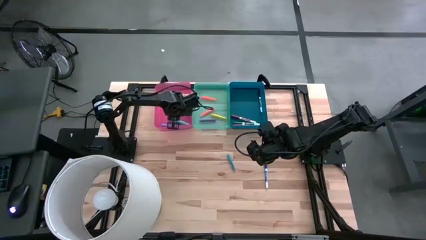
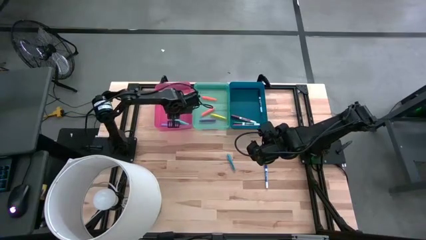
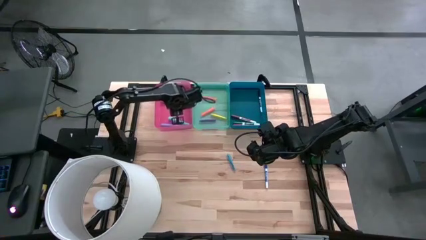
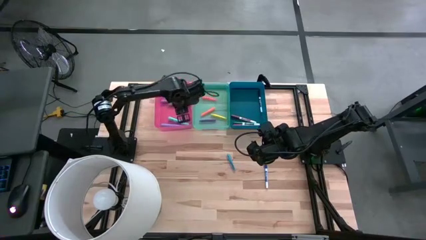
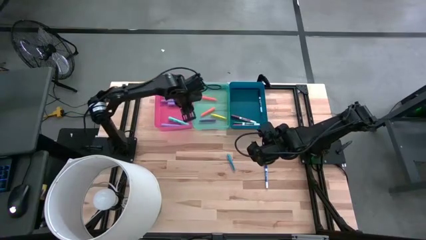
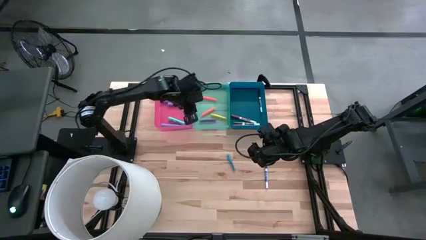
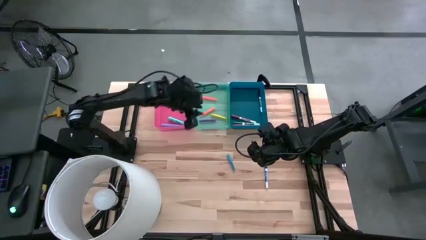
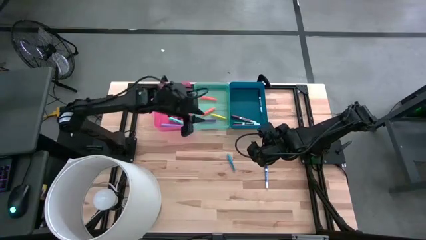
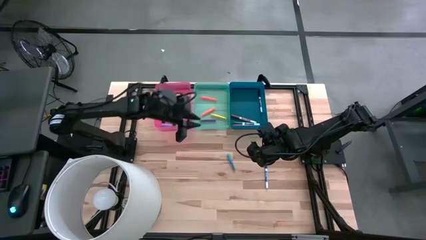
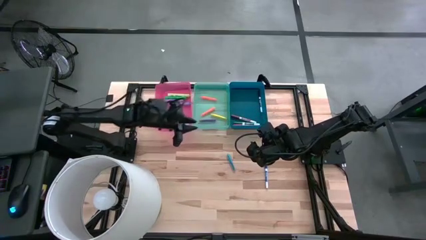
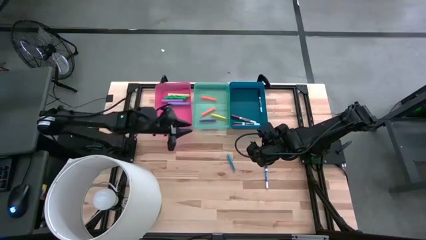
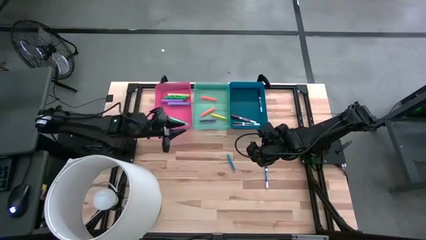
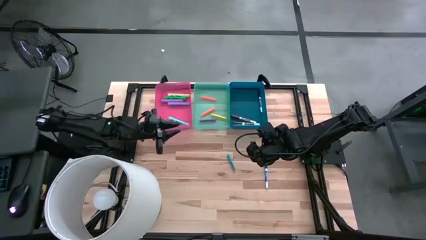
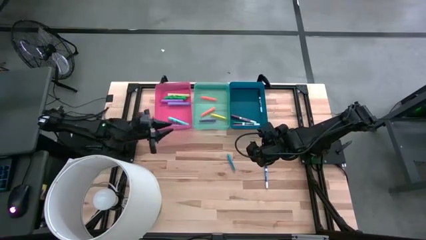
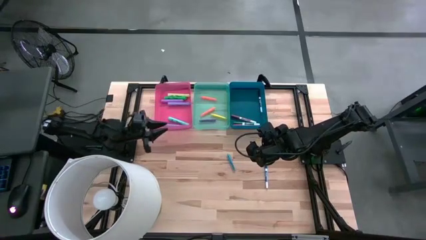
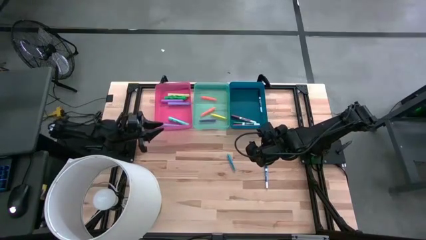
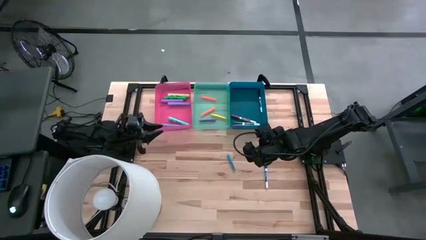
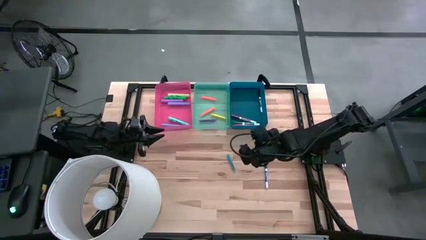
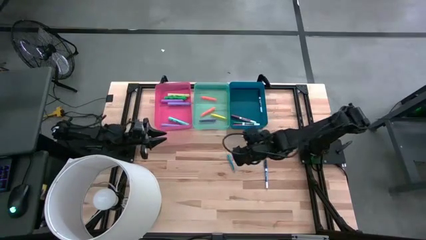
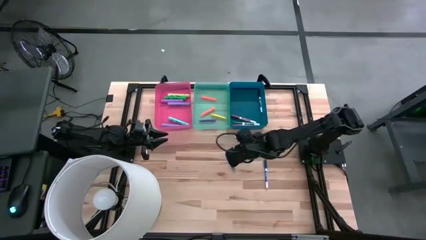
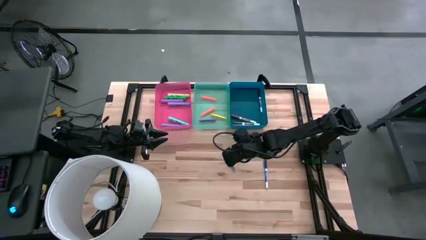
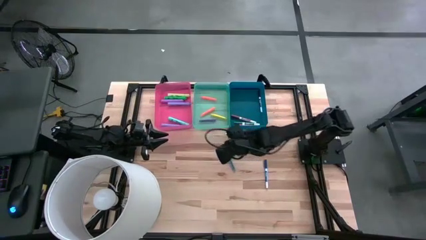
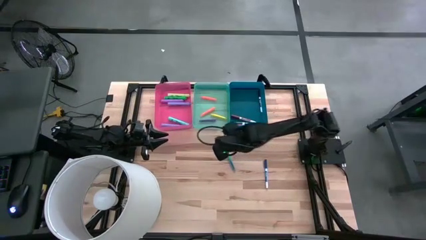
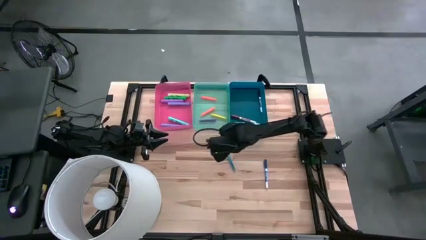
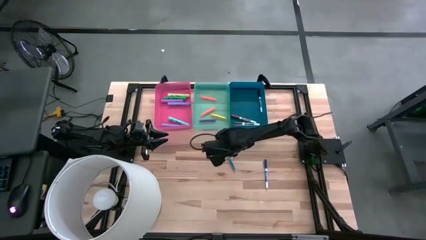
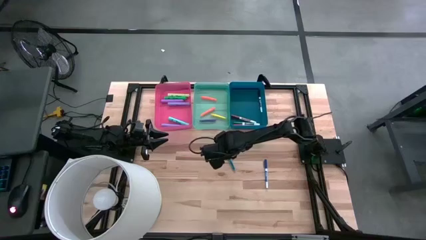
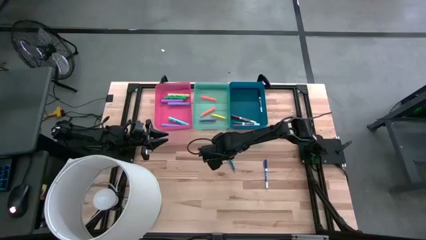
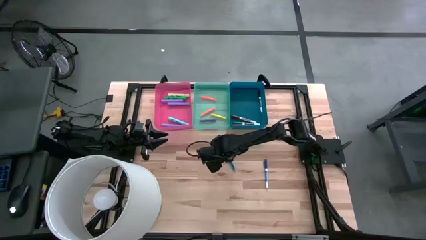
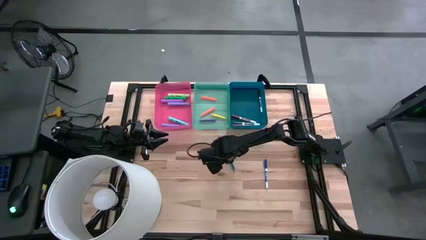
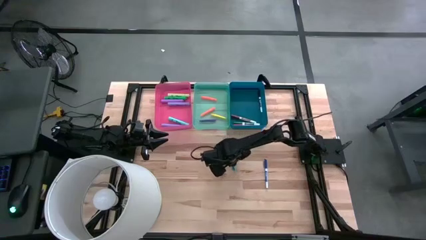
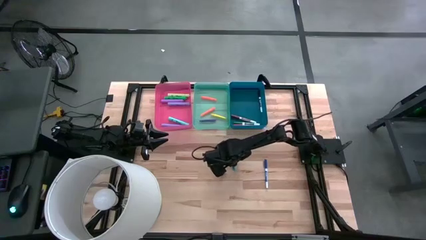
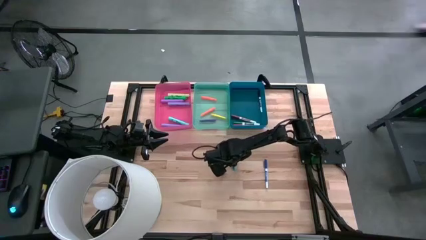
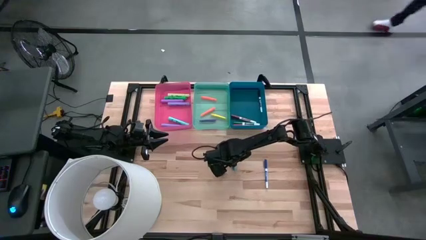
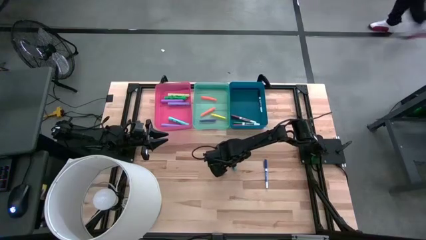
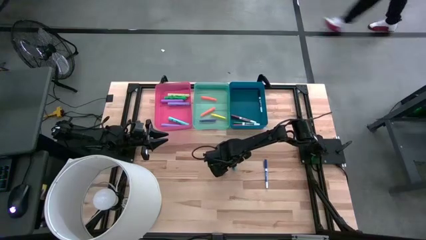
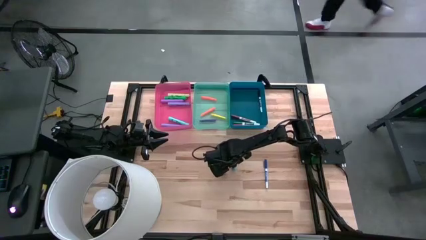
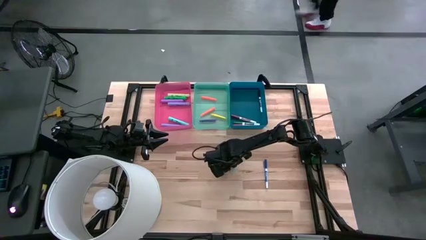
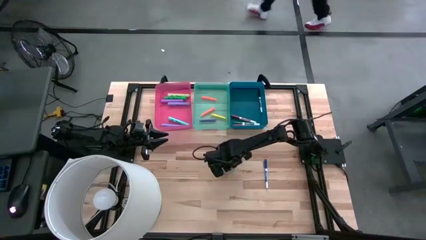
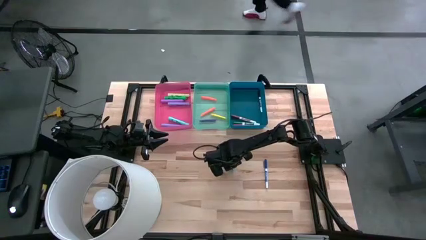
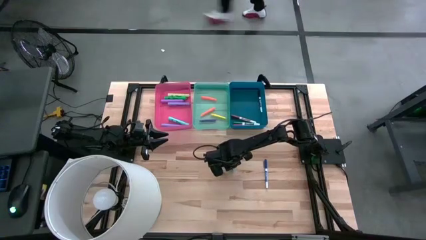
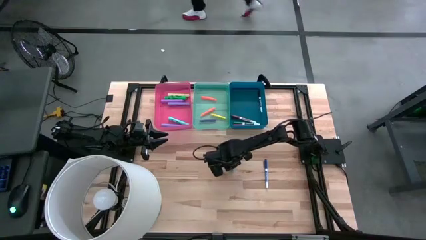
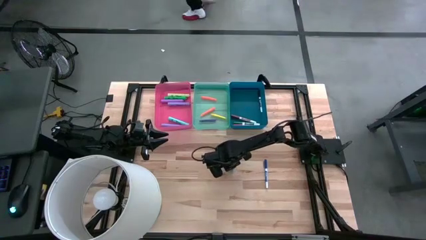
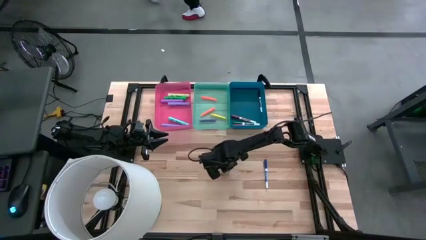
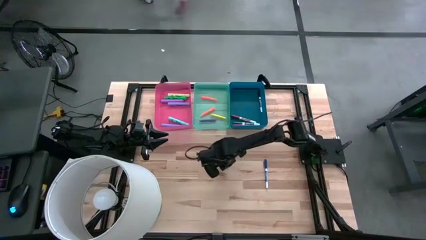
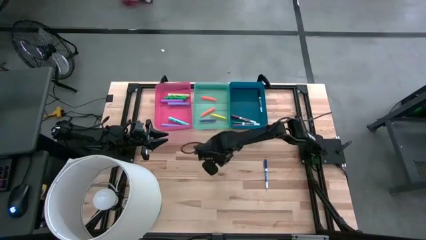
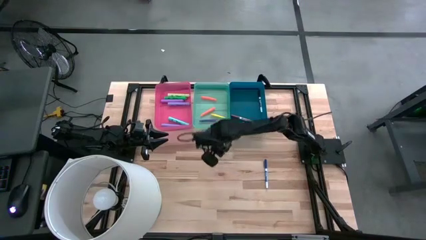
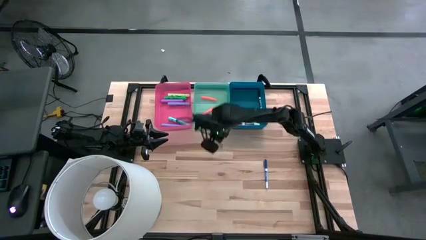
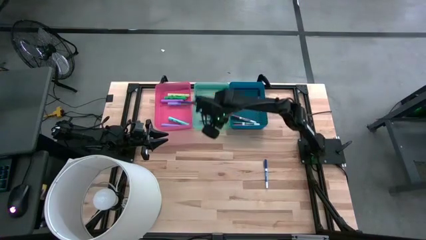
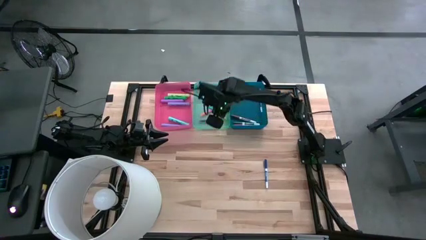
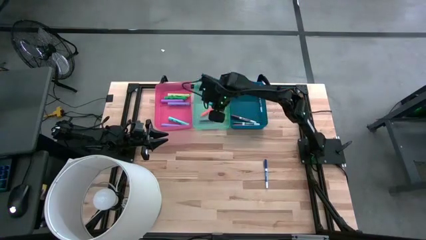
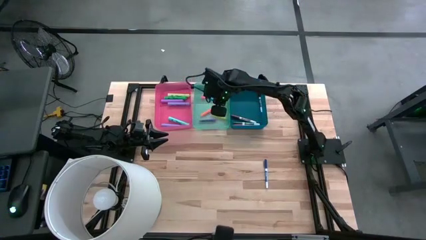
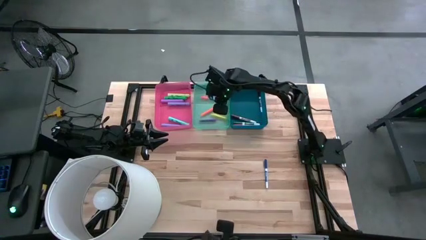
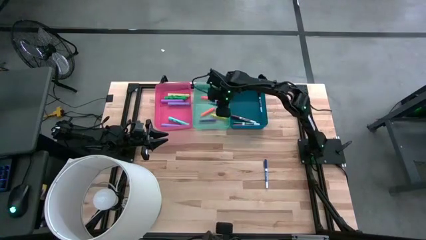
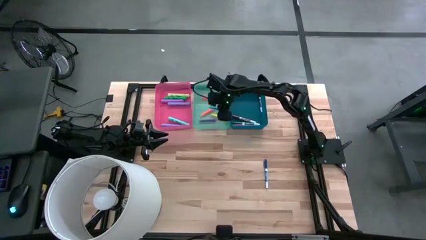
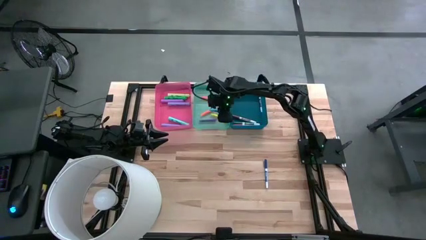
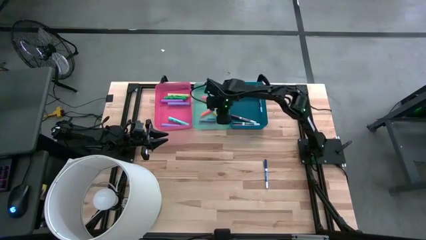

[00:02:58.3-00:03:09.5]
Task: Pick & Place Markers
Put the blue pen into the green bin

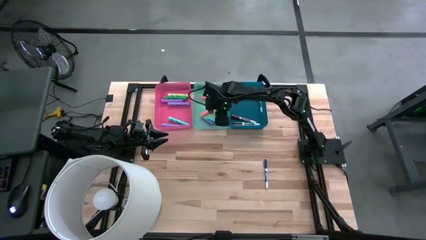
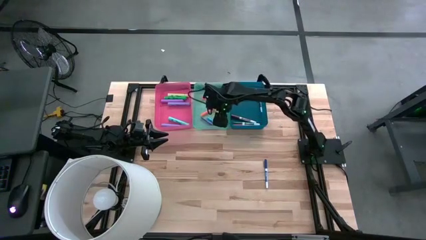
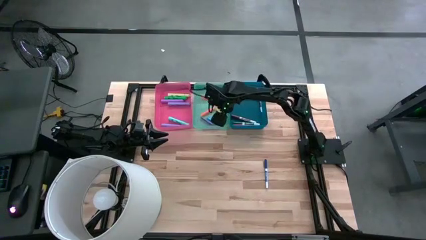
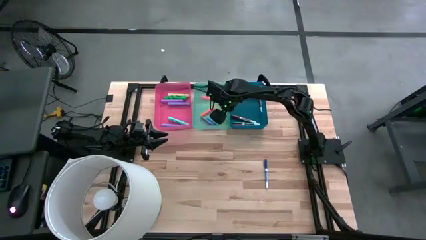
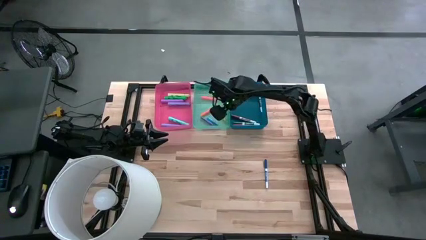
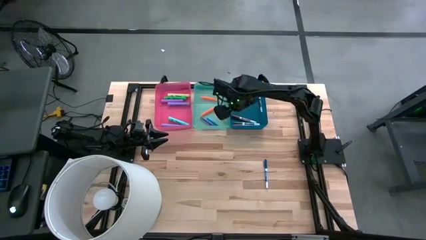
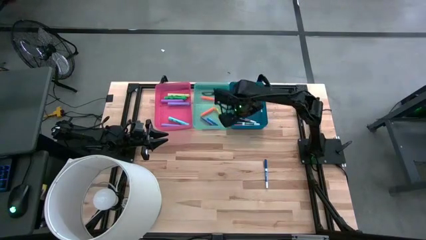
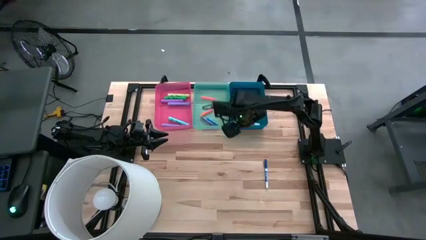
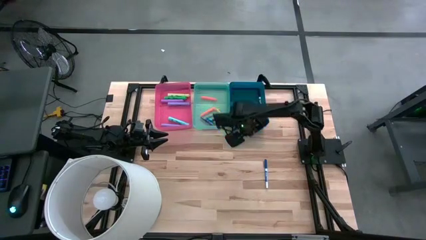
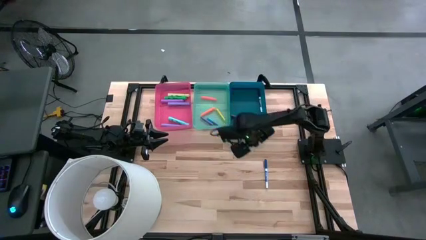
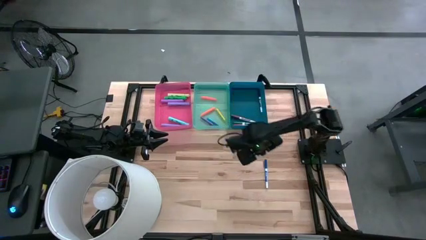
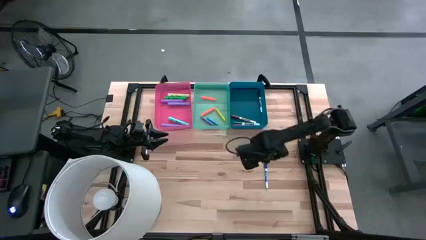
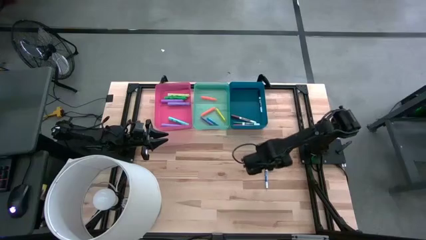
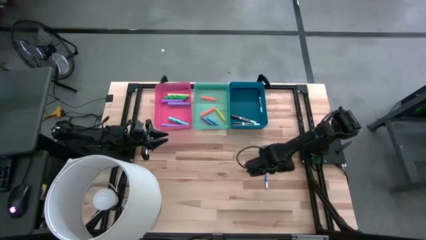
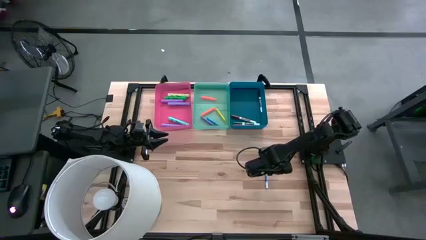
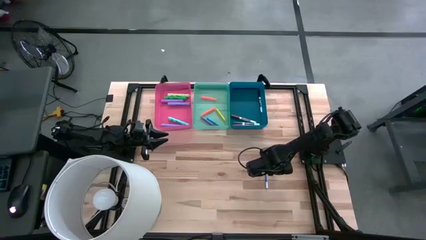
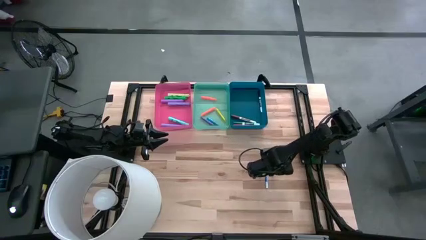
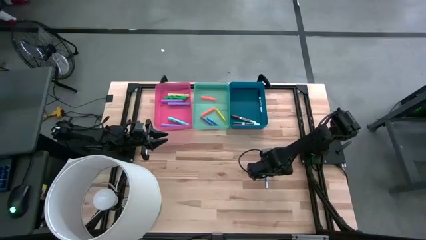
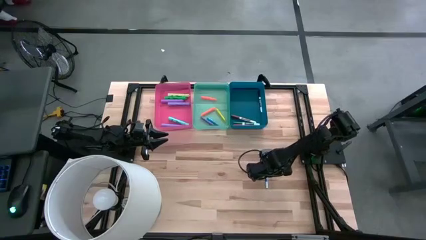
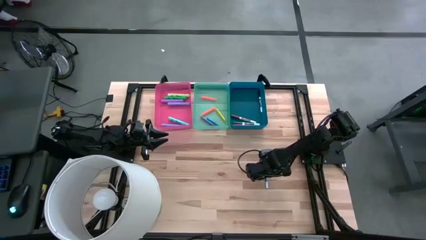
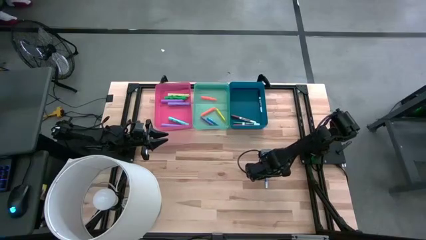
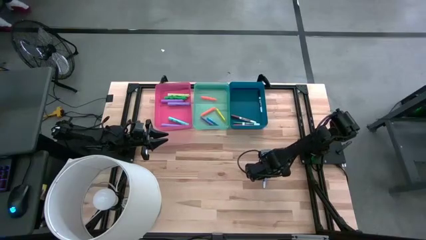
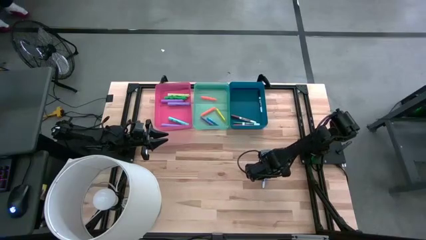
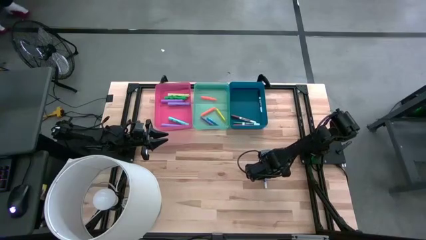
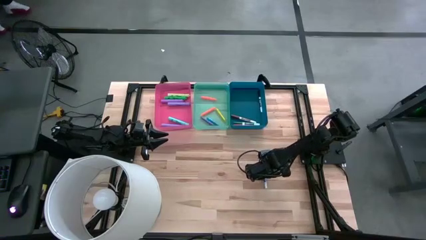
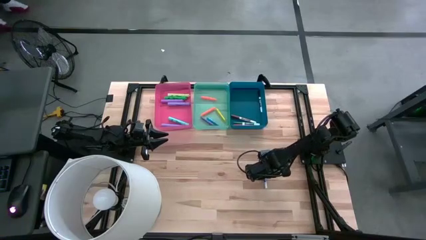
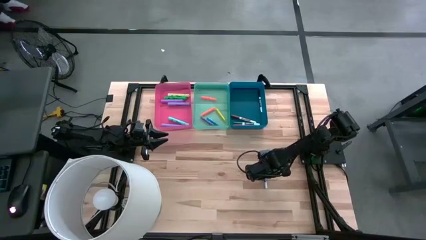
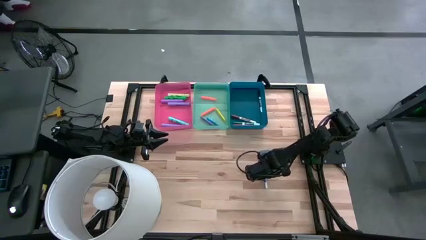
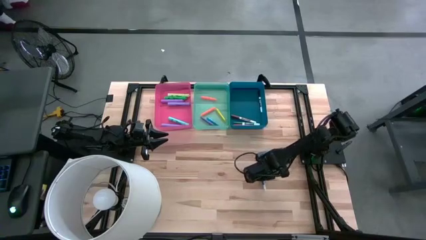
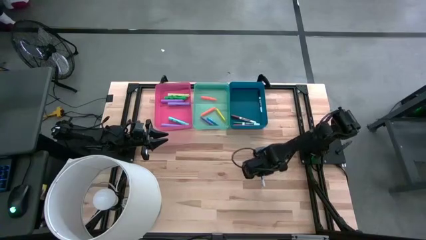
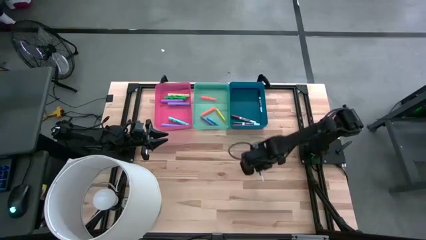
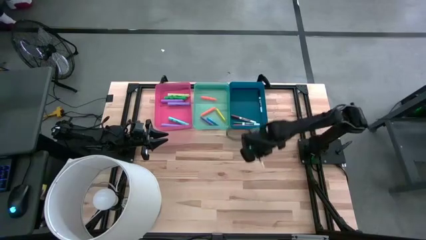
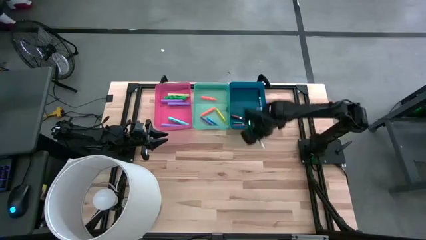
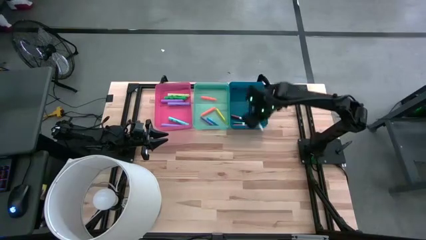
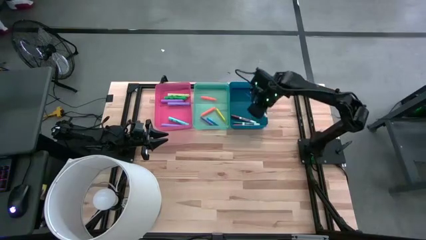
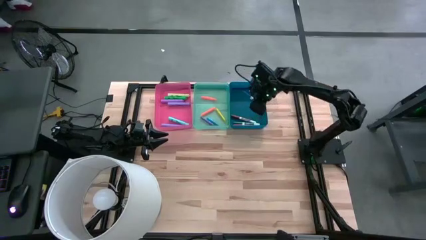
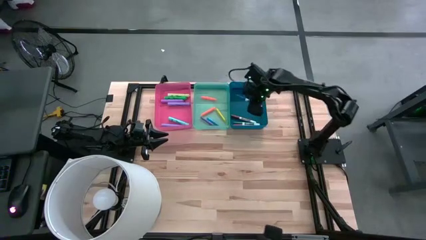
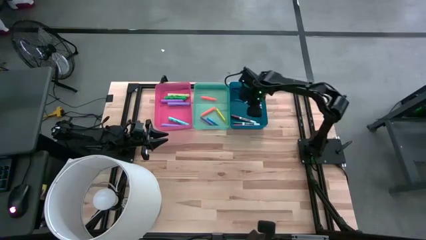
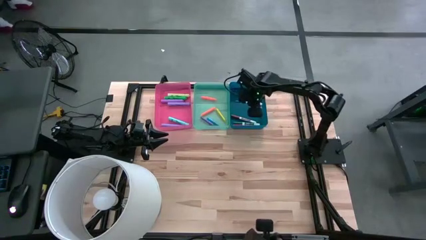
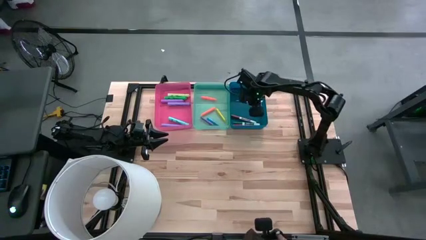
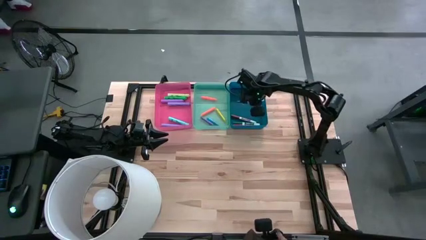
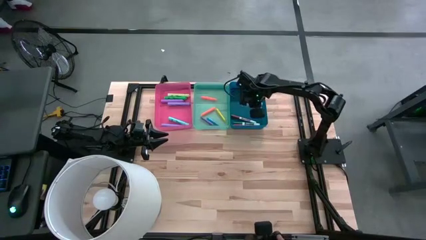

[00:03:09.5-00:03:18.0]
Put the blue highlighter into the blue bin
